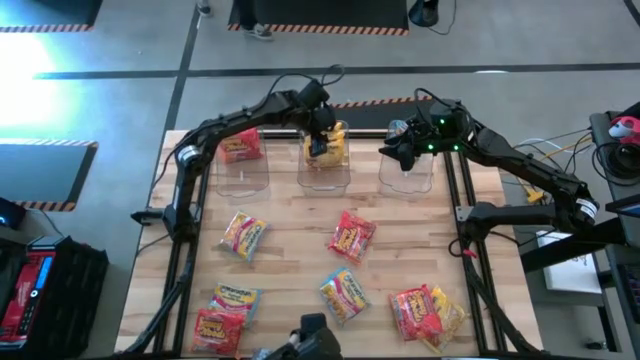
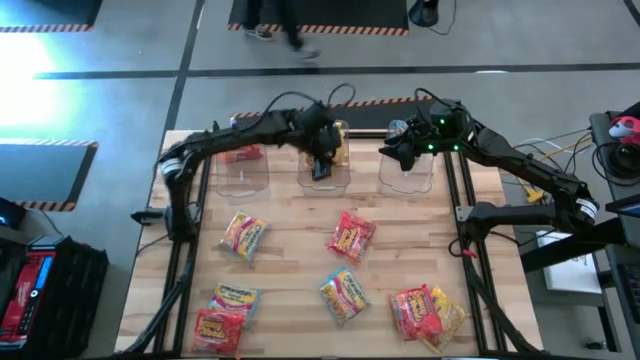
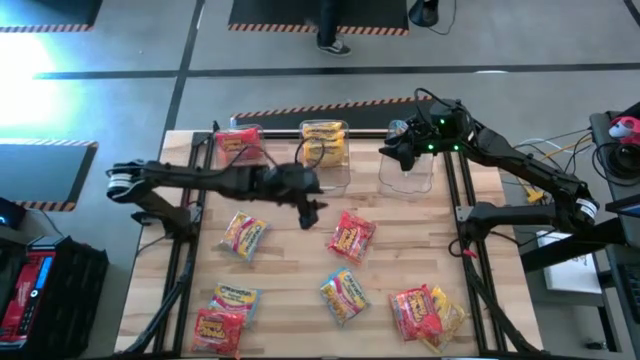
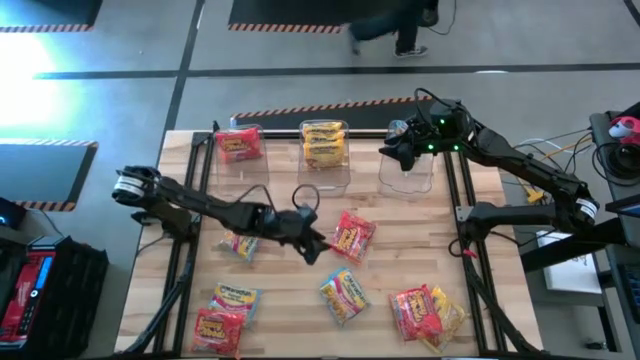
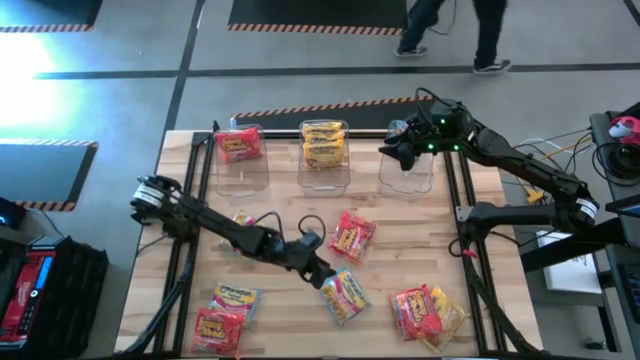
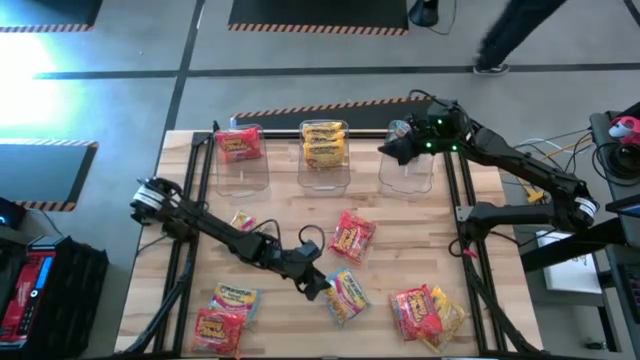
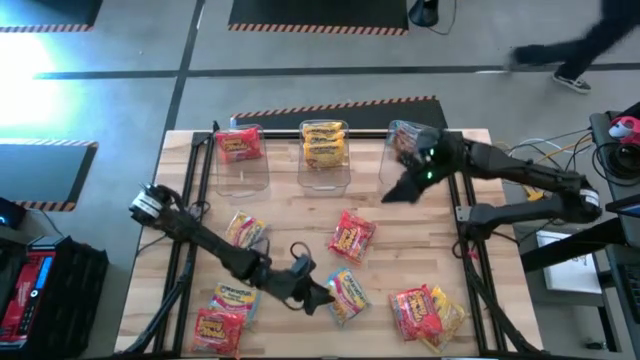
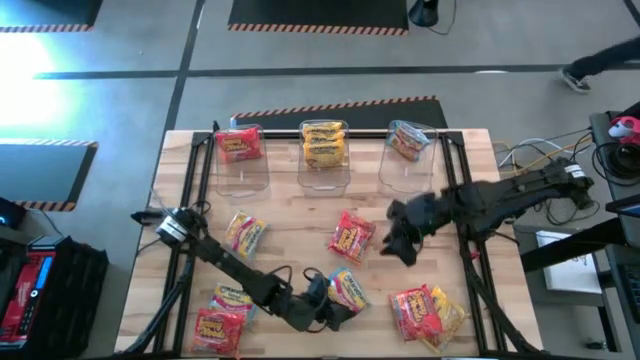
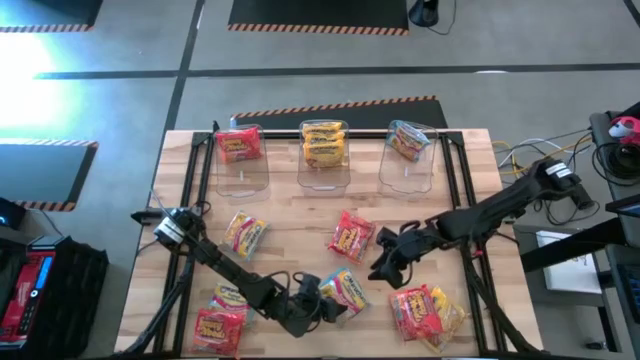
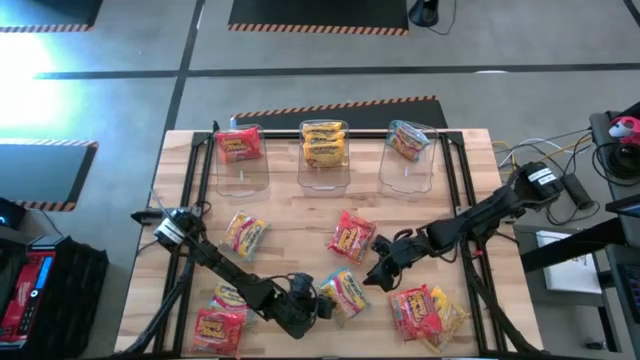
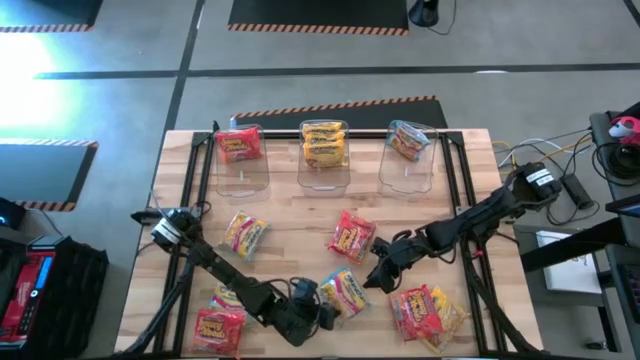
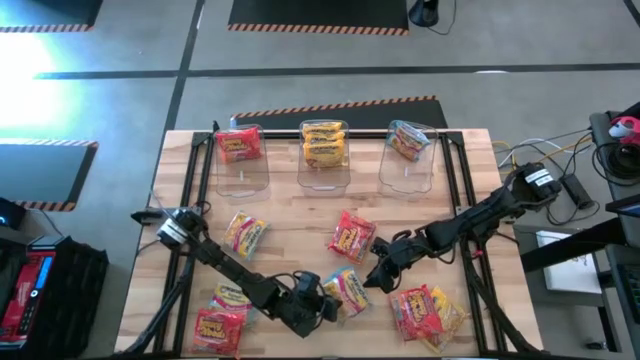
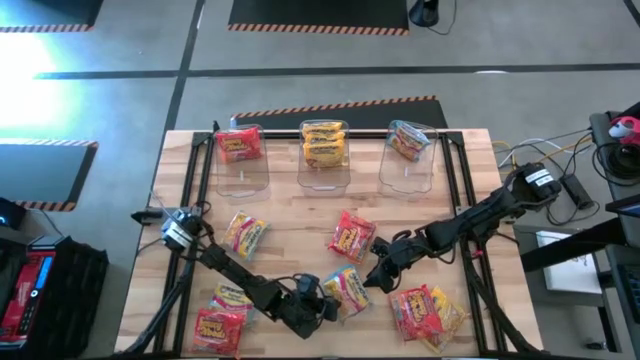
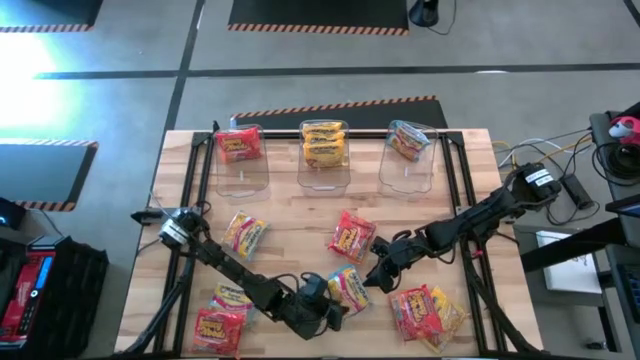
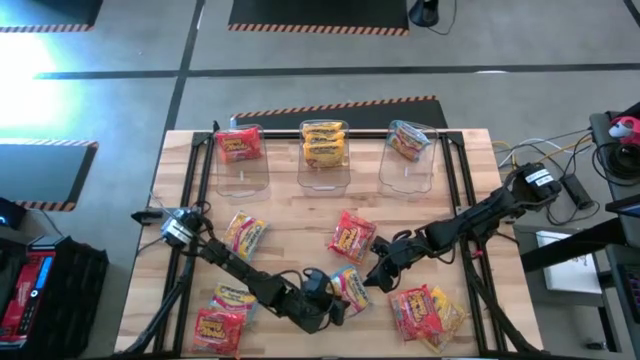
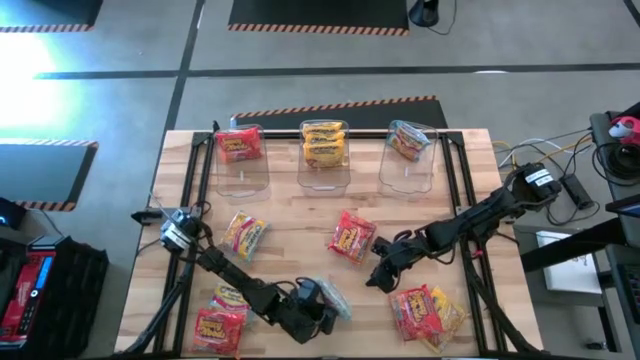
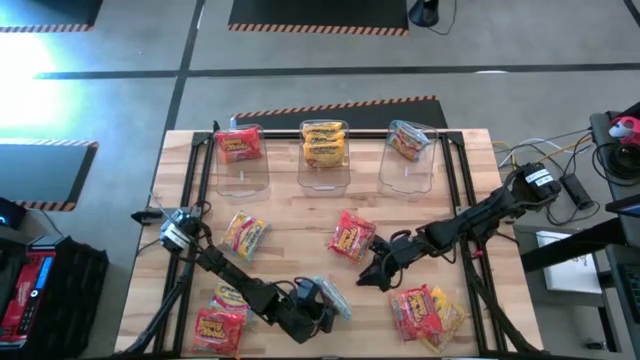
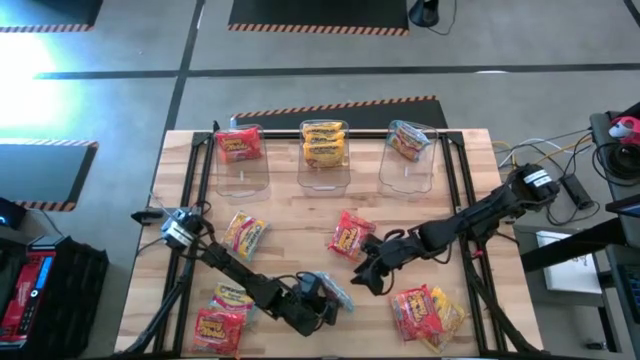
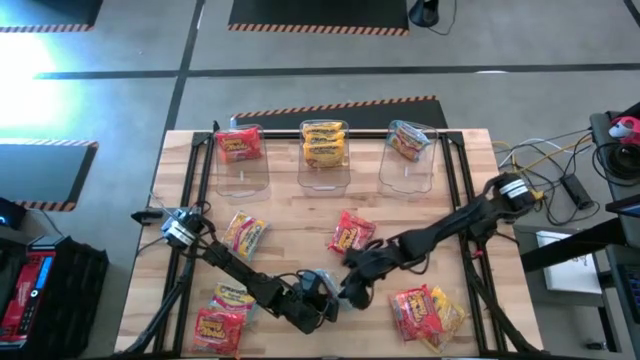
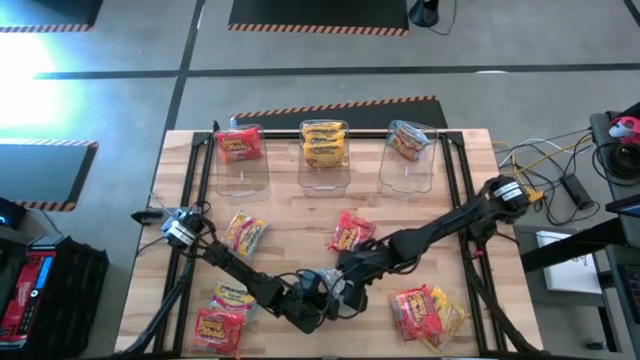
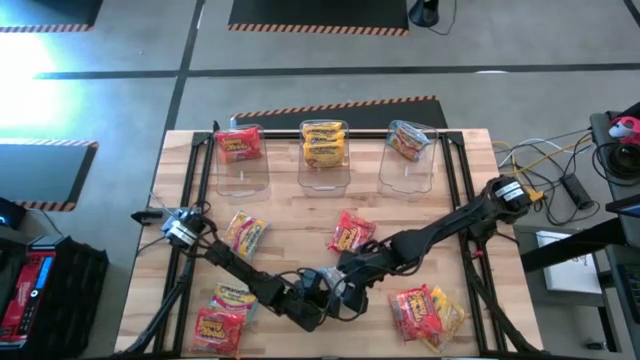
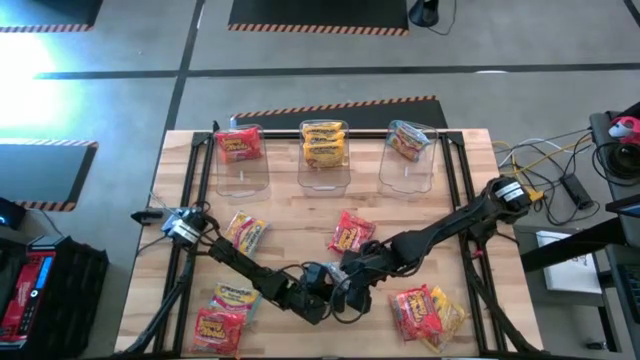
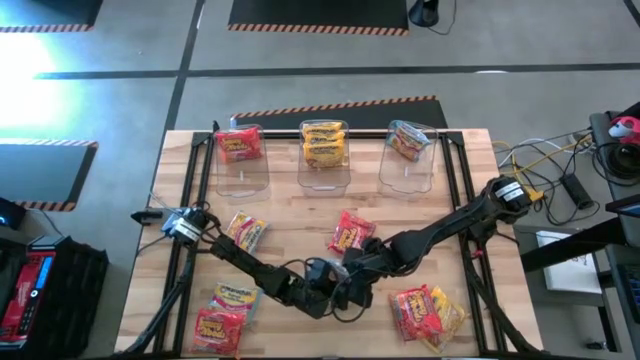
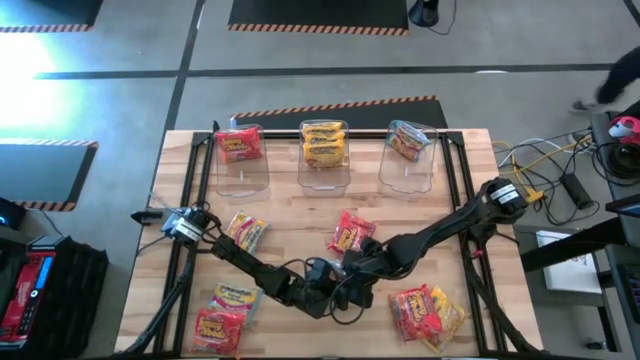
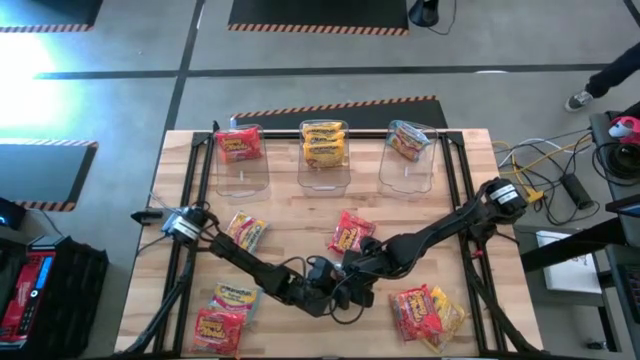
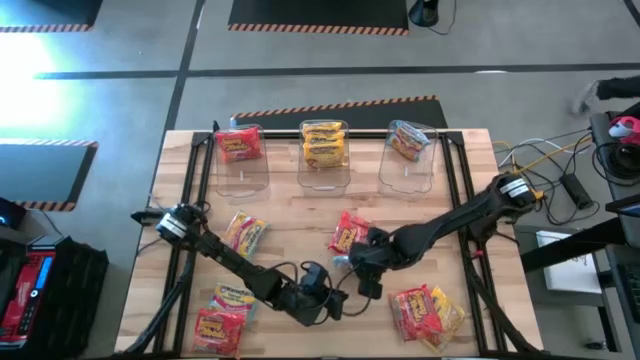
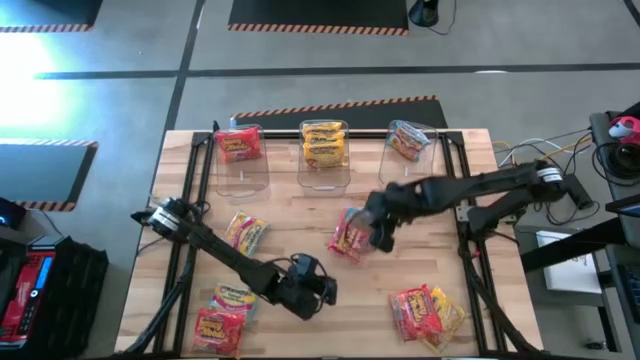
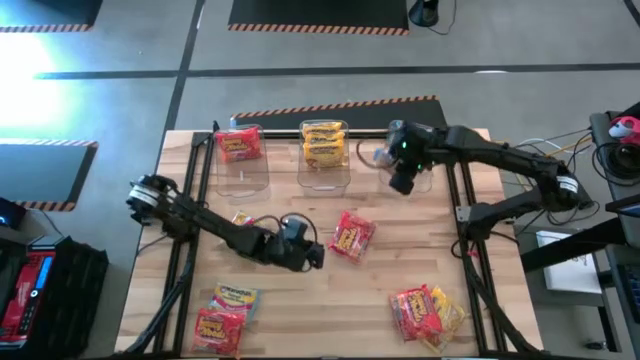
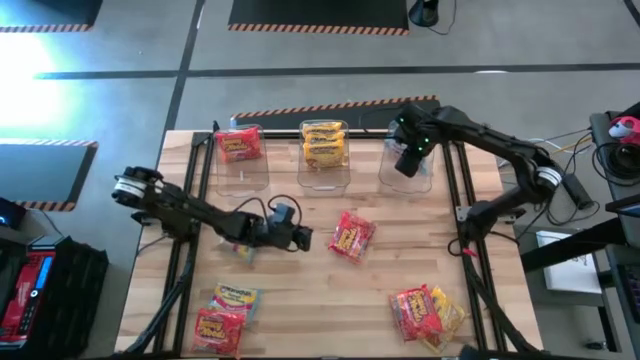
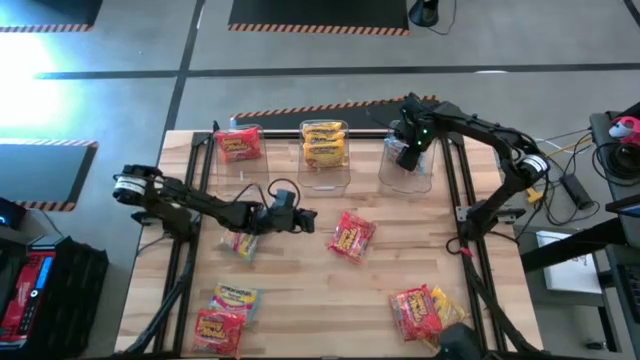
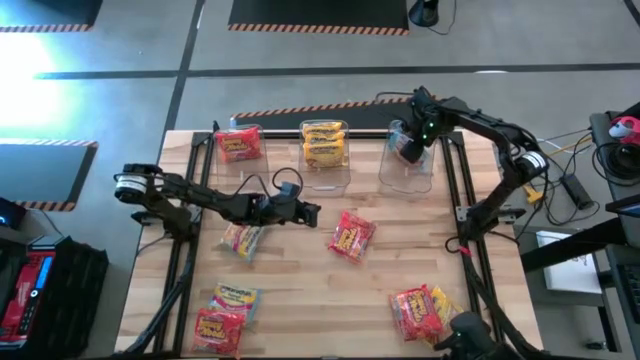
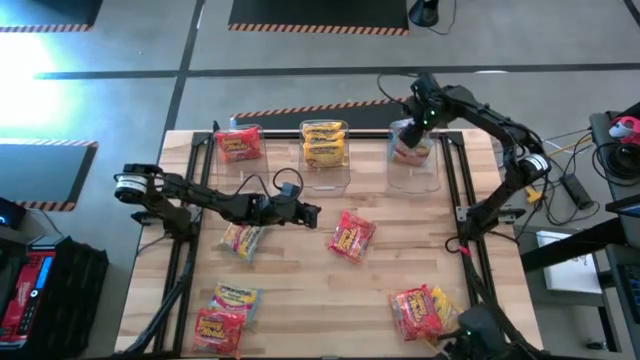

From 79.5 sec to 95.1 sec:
Task: Sort Maruchan noodles
Put the blue noodle pack into the right transparent bin
